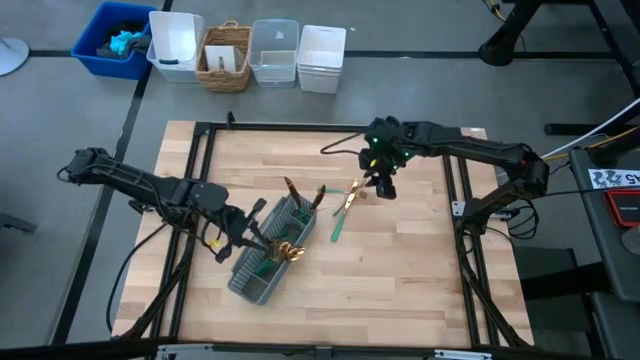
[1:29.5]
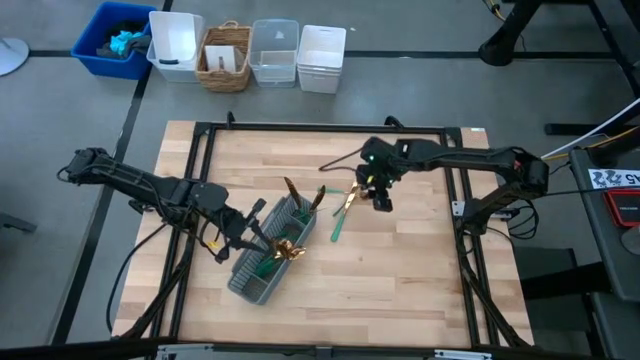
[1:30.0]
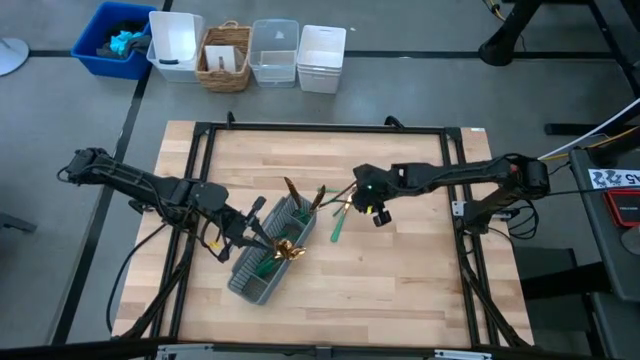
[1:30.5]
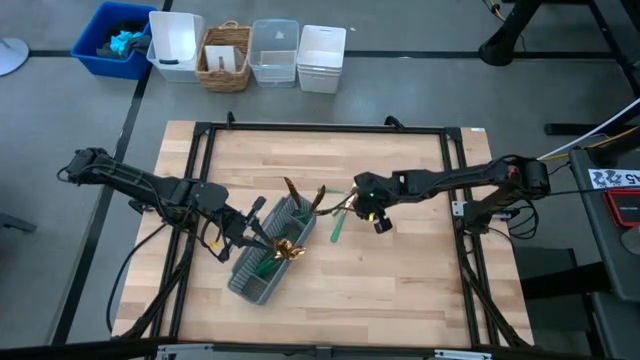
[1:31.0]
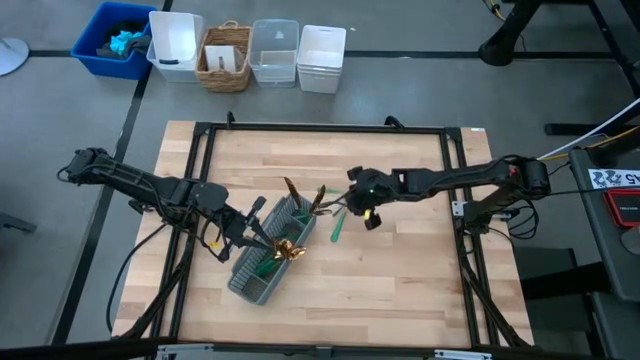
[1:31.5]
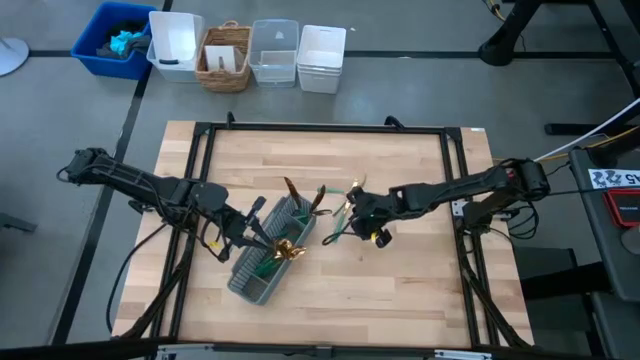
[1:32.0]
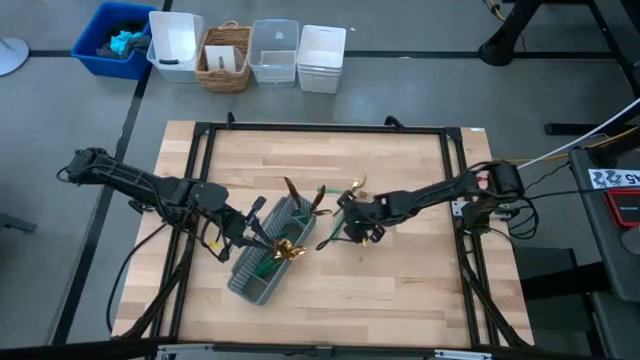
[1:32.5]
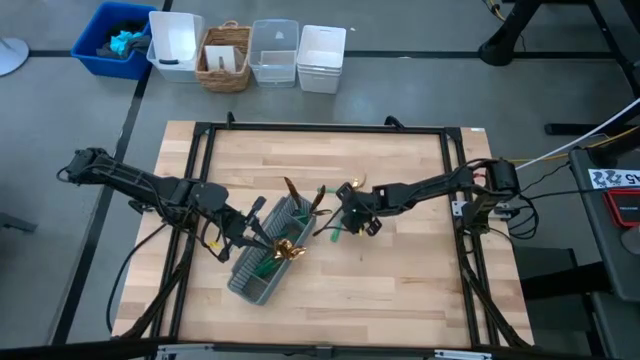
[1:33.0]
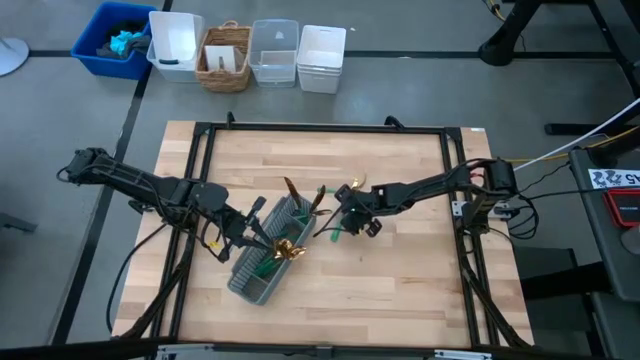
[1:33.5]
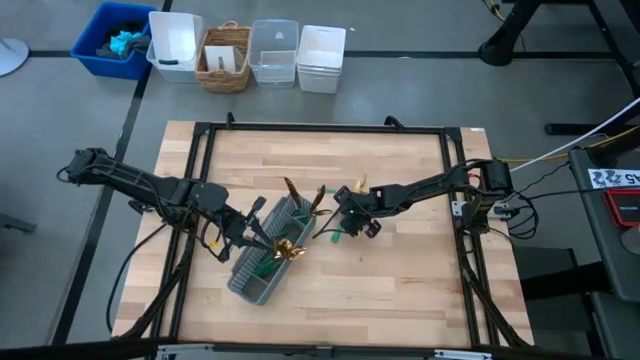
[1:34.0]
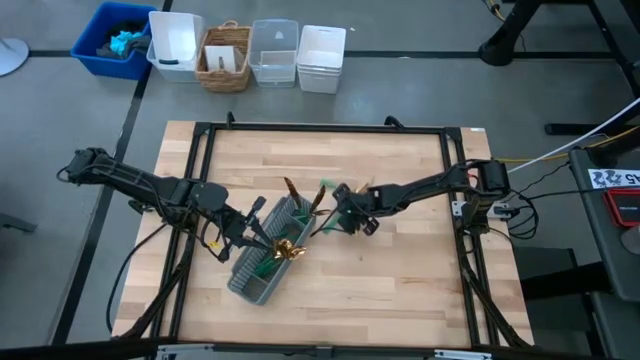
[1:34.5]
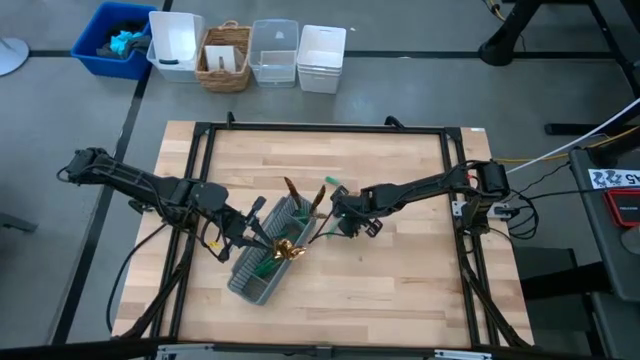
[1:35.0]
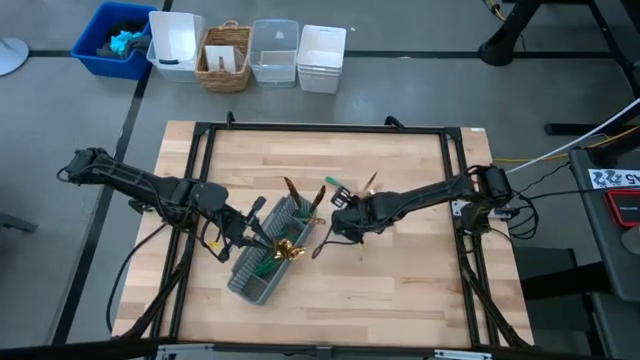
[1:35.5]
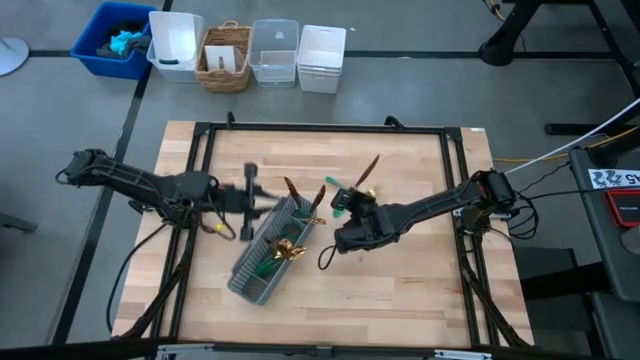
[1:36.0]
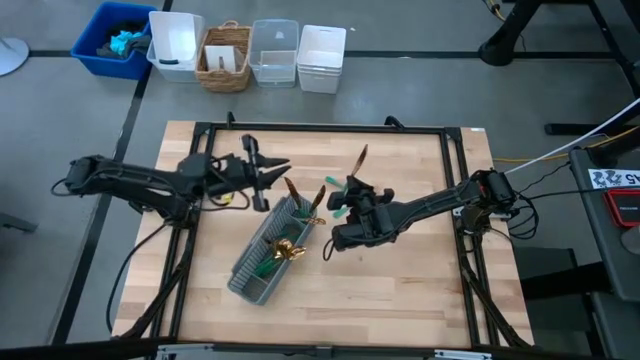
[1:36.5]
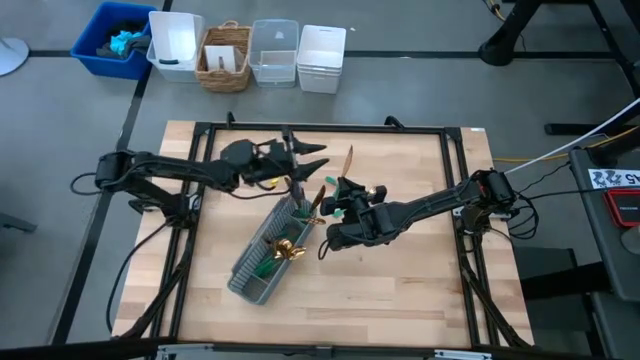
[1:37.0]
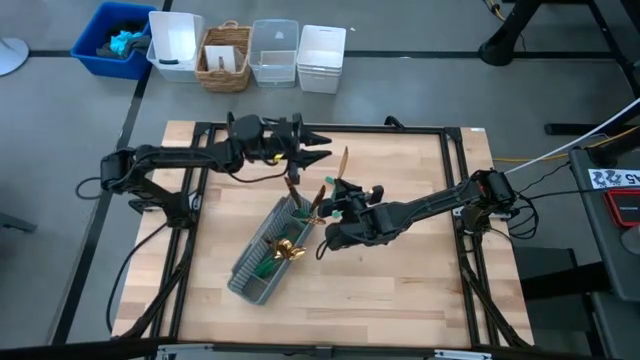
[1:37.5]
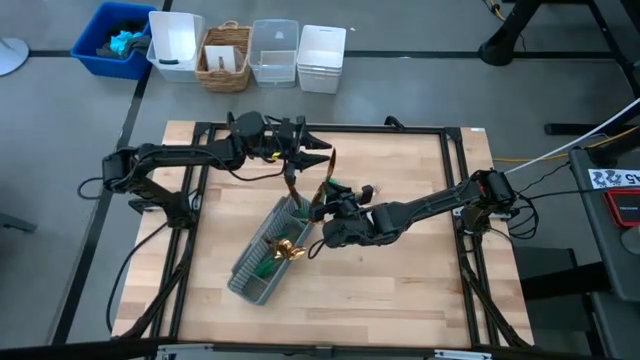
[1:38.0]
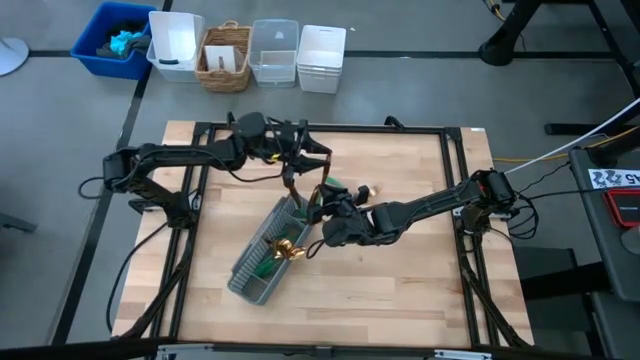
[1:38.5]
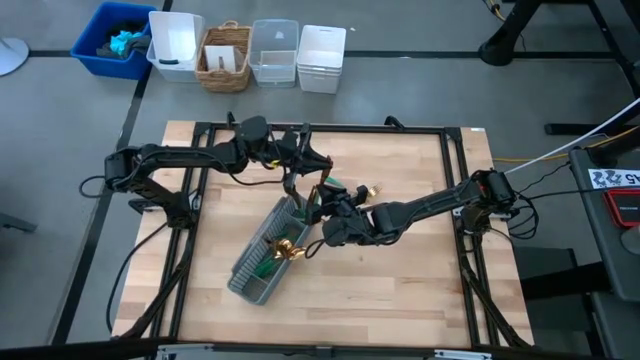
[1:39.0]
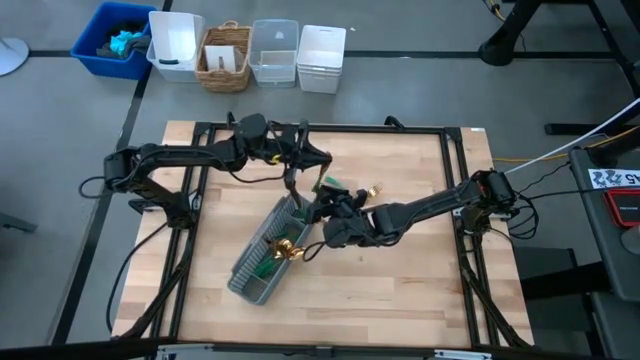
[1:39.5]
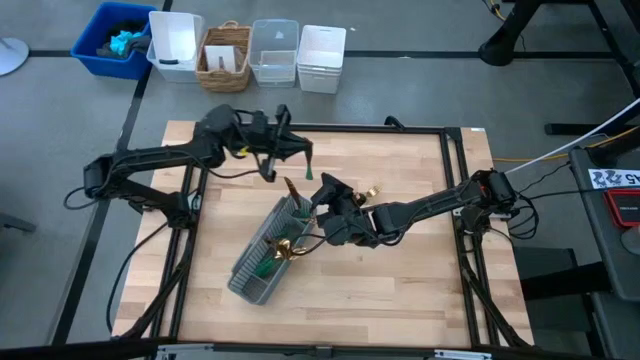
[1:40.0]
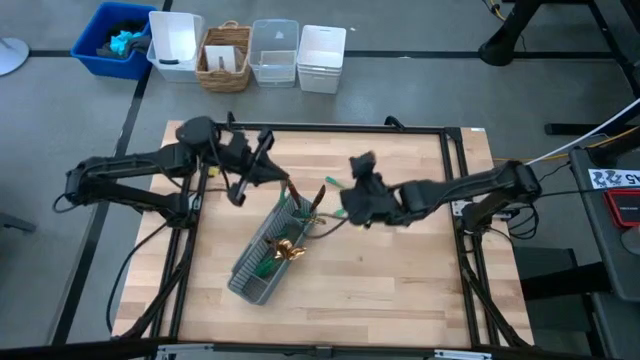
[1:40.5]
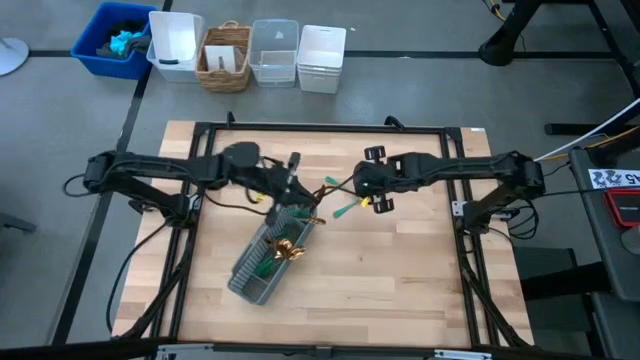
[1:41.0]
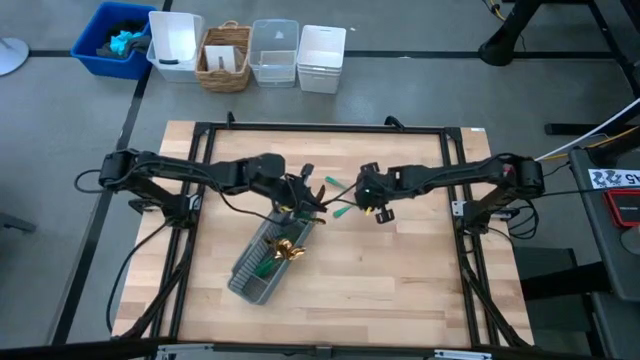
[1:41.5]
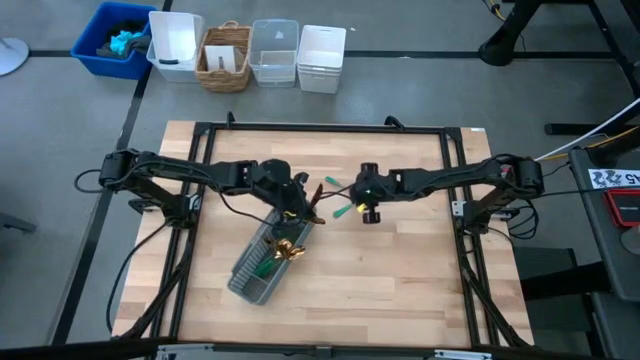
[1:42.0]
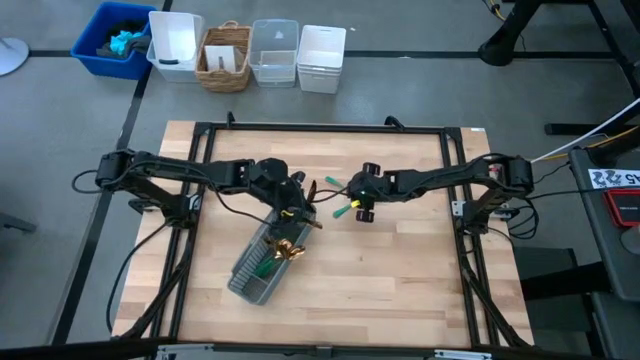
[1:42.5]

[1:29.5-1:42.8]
Task: Sort silverware
Put the green knife into the silverware basket

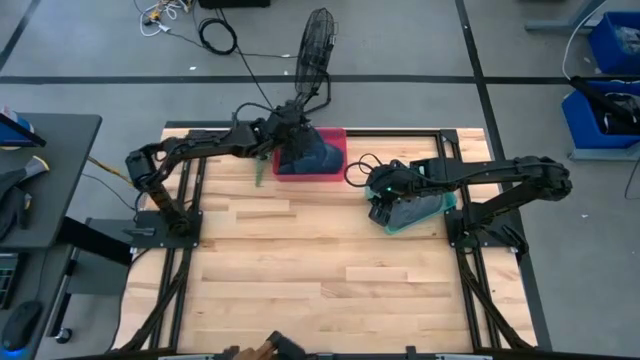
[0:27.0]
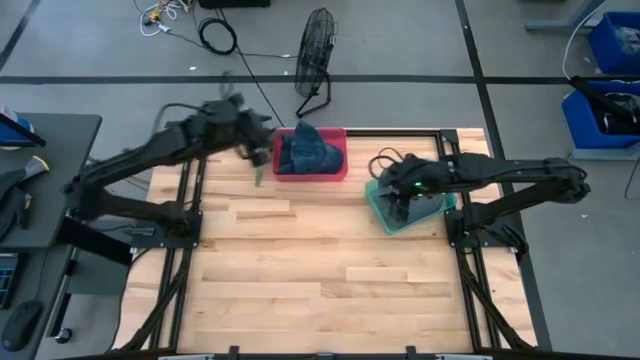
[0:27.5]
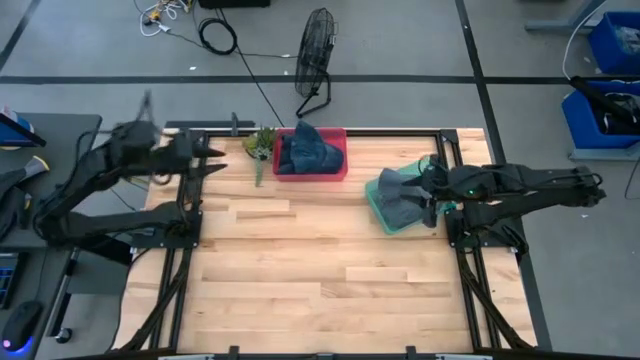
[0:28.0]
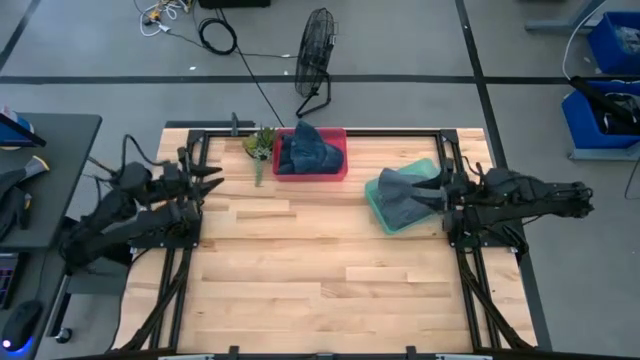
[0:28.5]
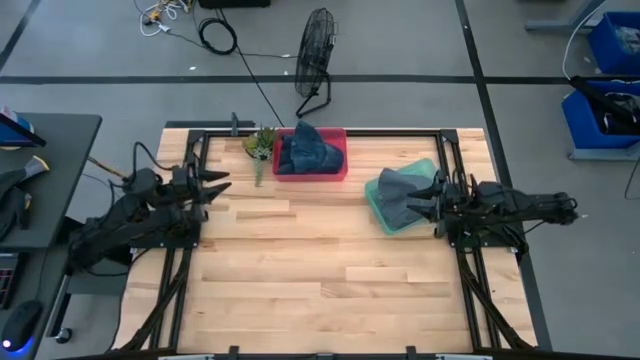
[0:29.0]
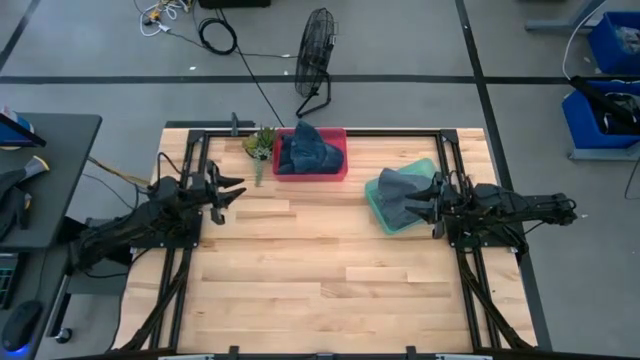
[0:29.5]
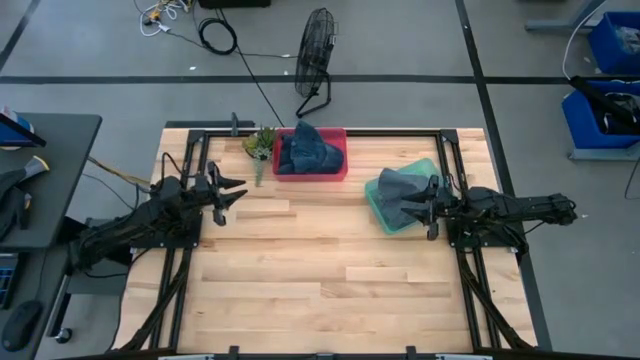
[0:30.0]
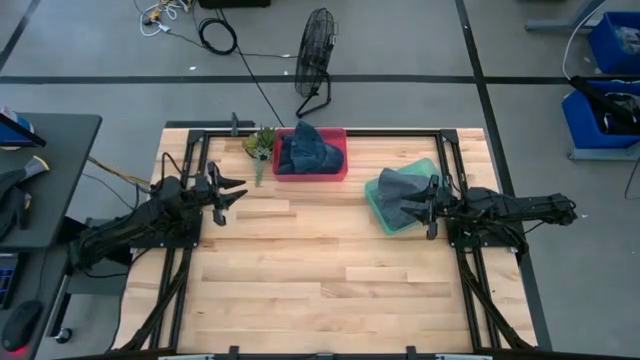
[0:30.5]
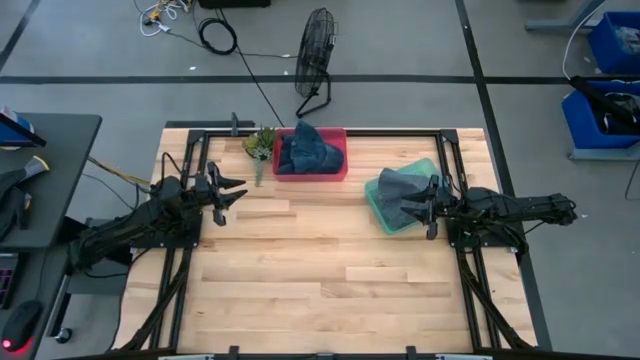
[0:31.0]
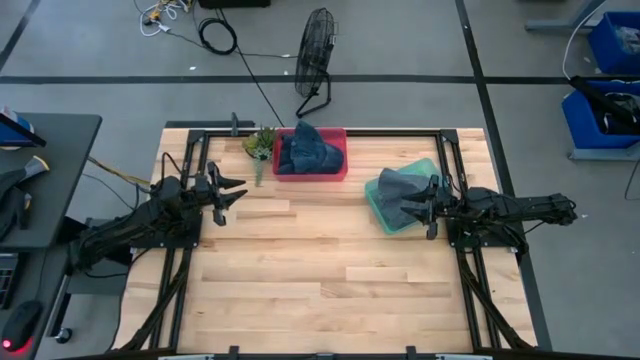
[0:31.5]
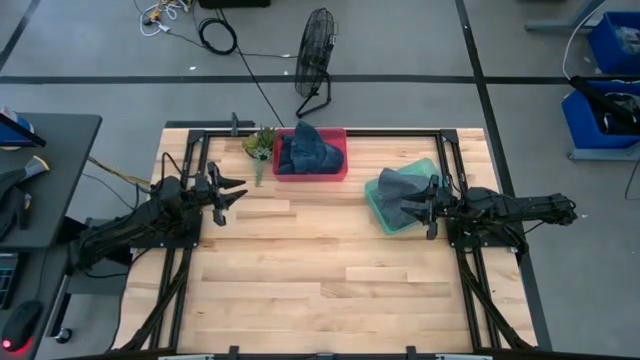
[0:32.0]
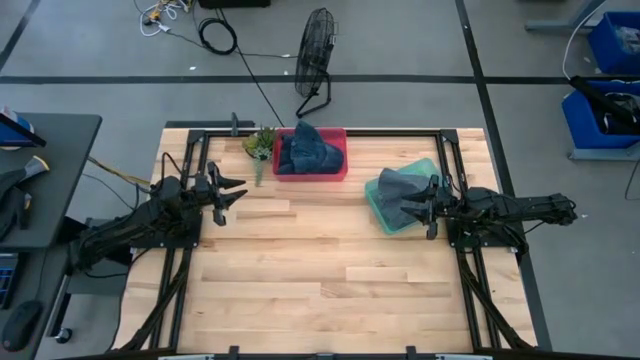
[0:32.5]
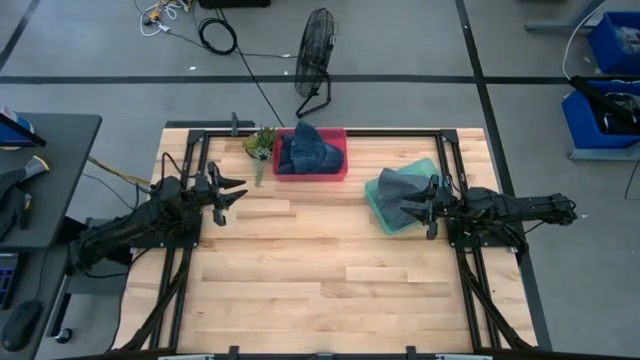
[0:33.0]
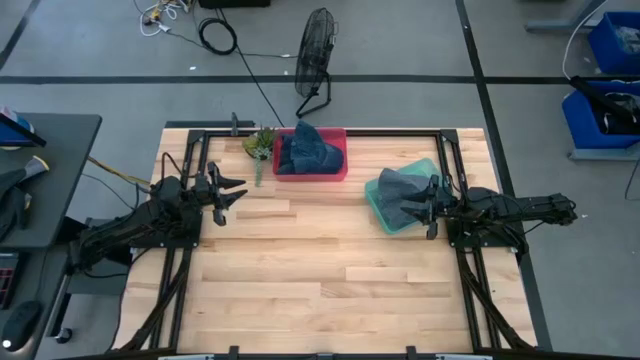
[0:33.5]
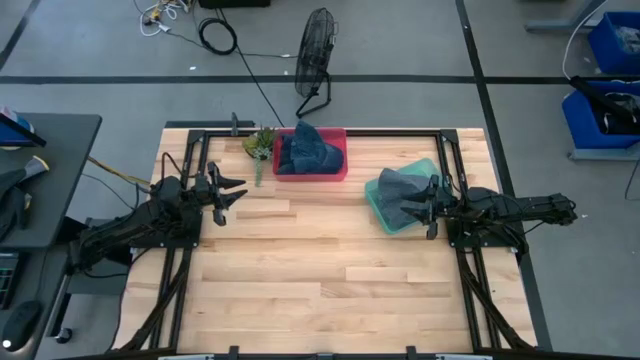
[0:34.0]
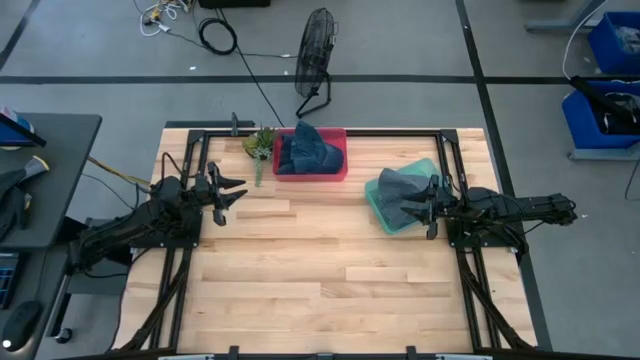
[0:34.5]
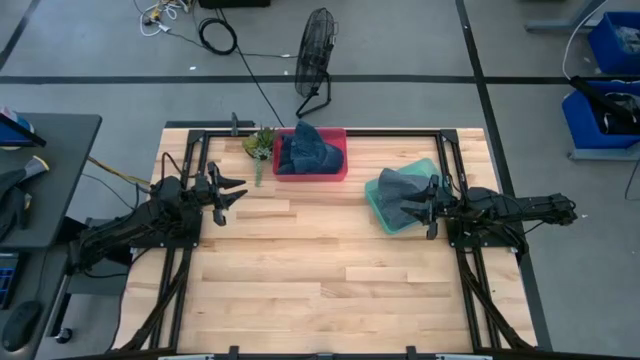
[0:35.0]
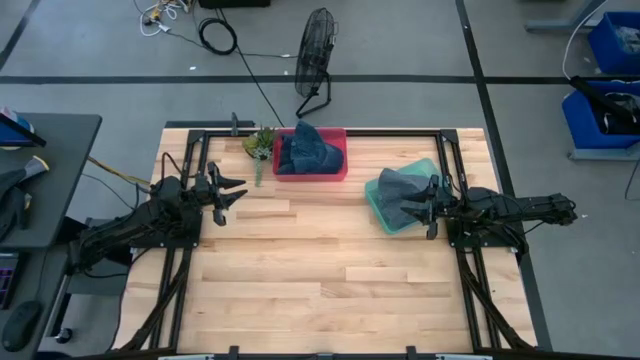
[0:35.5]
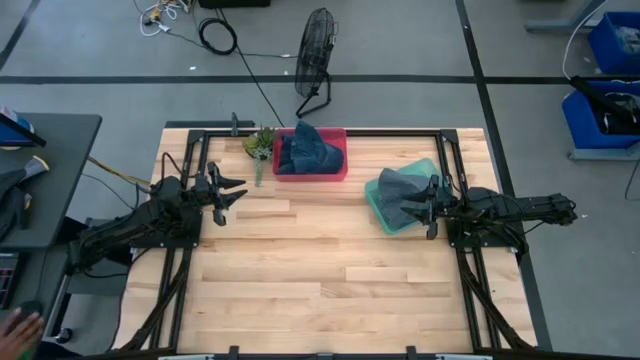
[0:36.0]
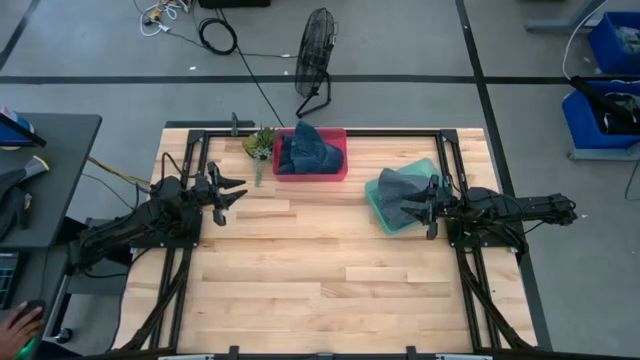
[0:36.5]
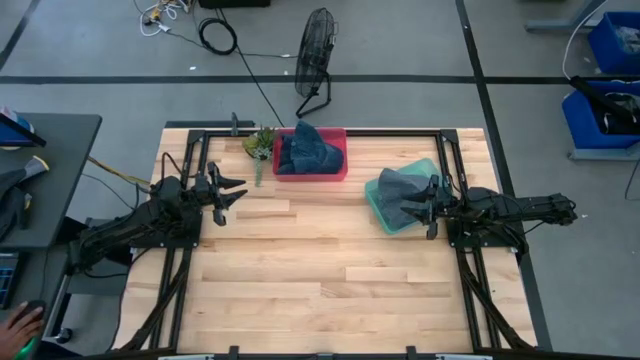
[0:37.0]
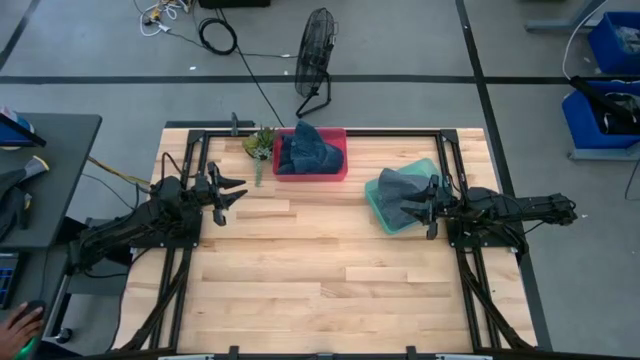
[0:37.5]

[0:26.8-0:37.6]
Task: Pick & Place hat
Return to Home Position
